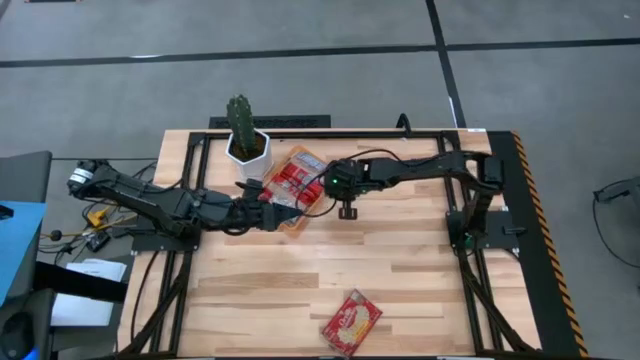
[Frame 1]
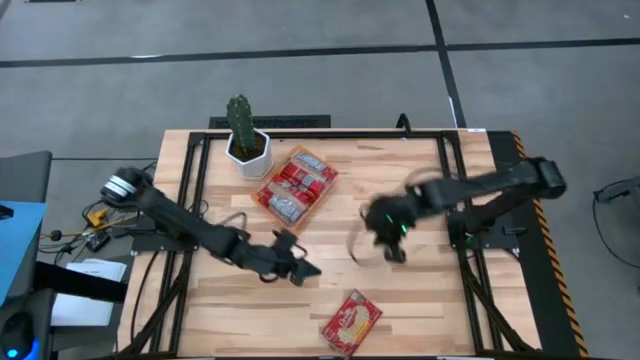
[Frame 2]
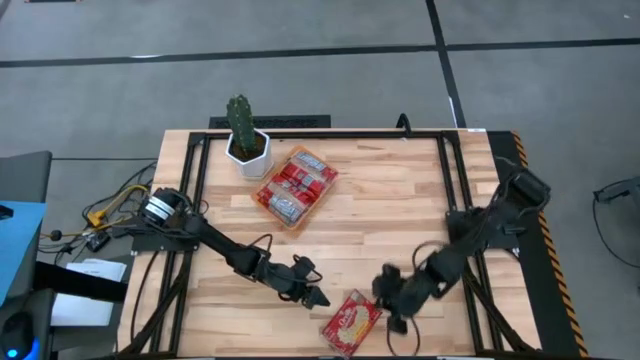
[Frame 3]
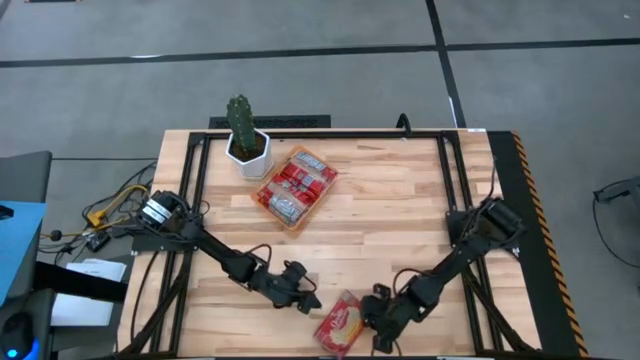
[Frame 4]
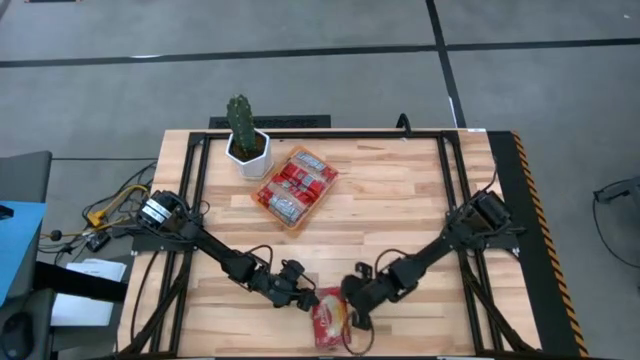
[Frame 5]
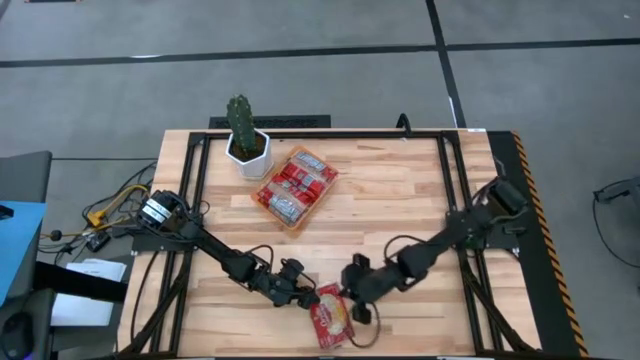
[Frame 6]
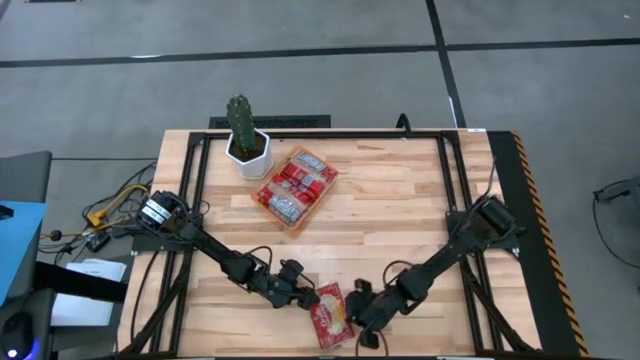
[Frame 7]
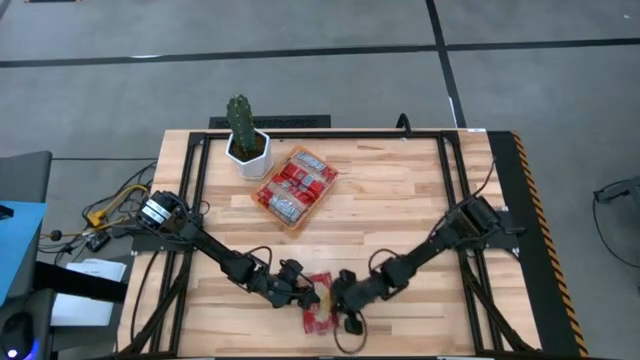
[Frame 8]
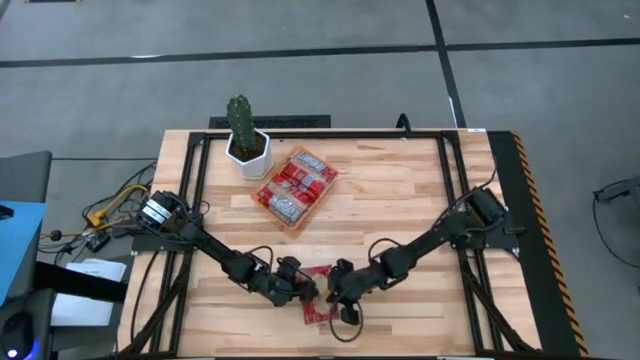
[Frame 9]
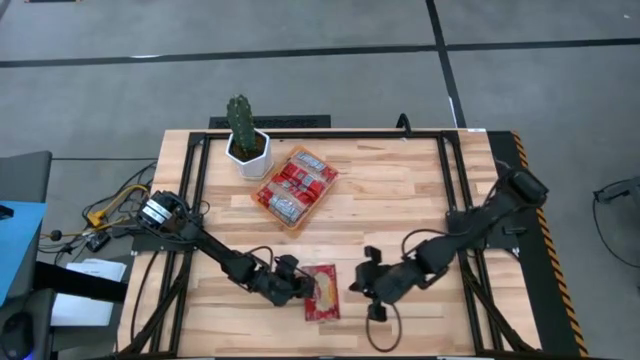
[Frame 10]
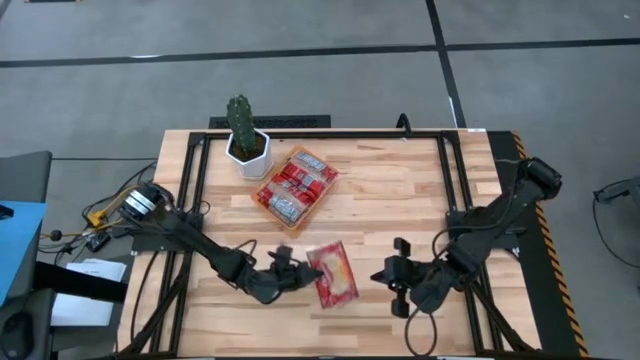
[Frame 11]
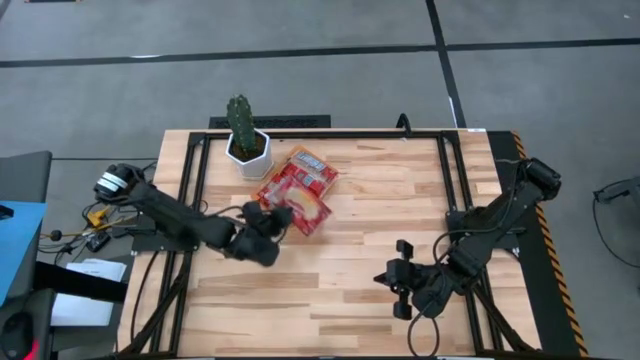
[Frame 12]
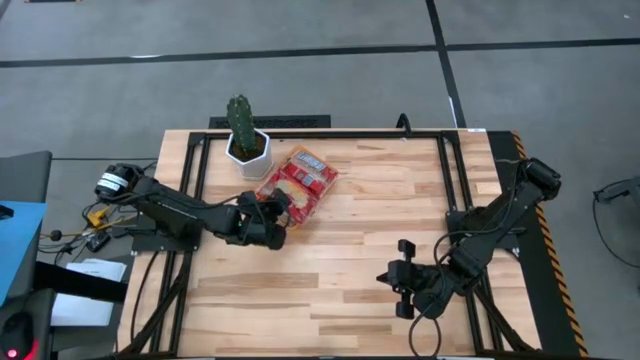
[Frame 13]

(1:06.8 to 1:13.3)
Task: Sort popcorn bags into baskets
Put the popcorn bag into the orange bin

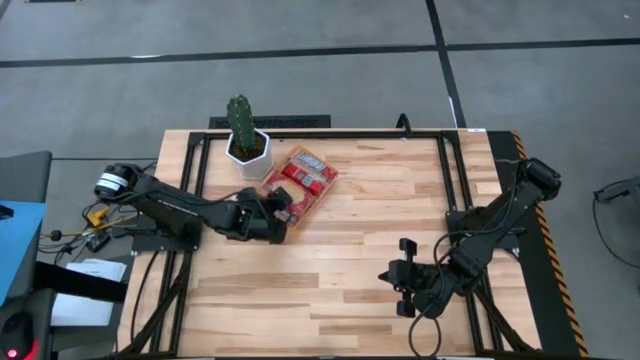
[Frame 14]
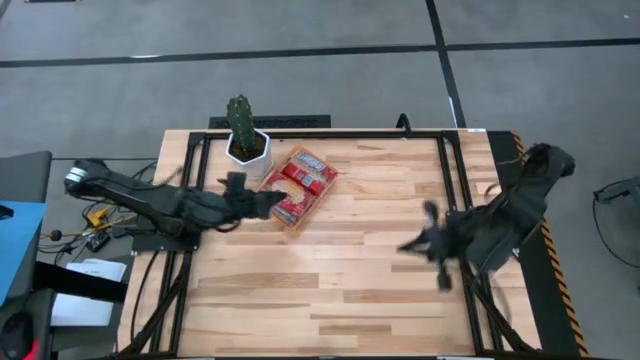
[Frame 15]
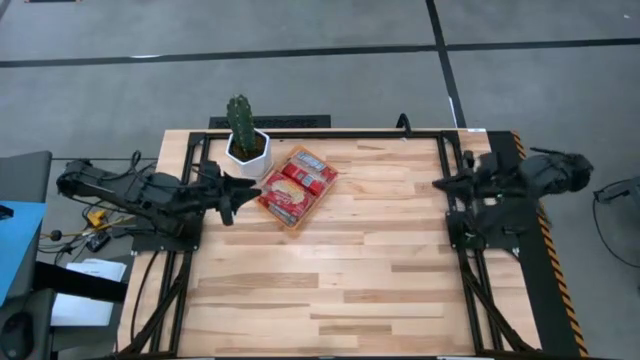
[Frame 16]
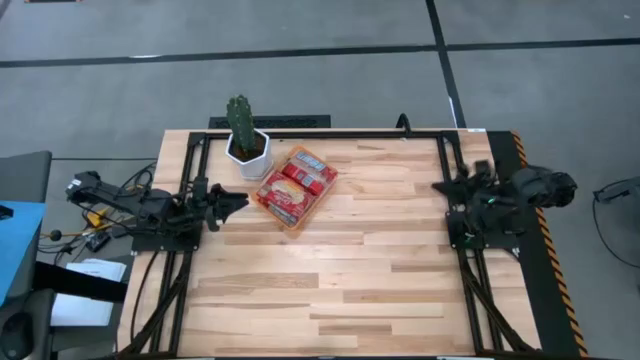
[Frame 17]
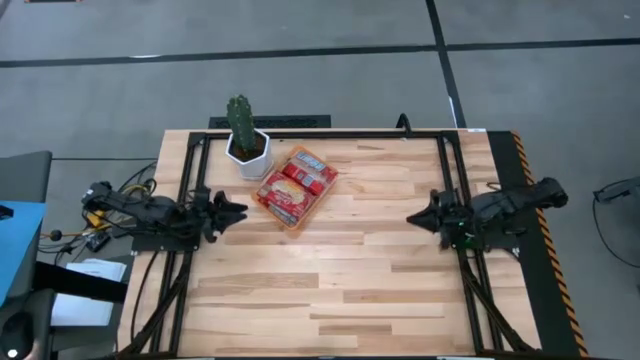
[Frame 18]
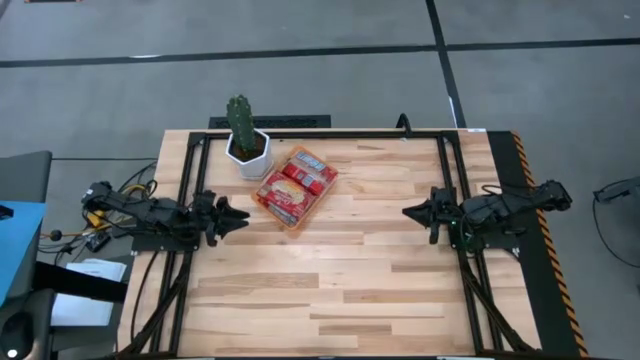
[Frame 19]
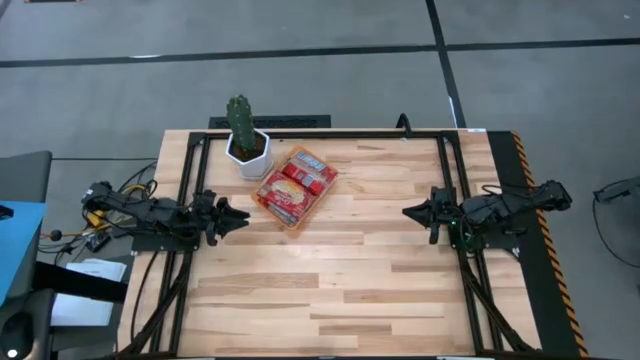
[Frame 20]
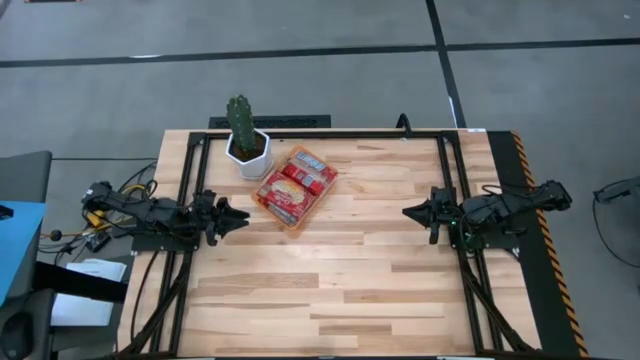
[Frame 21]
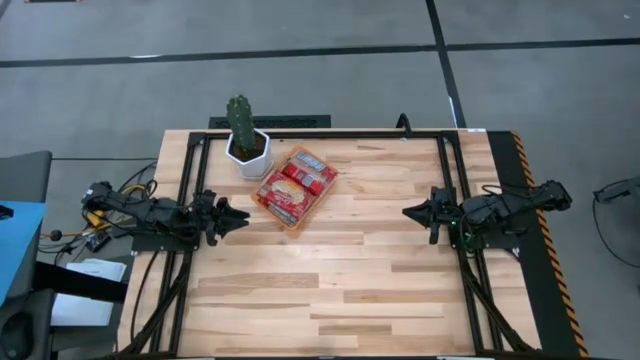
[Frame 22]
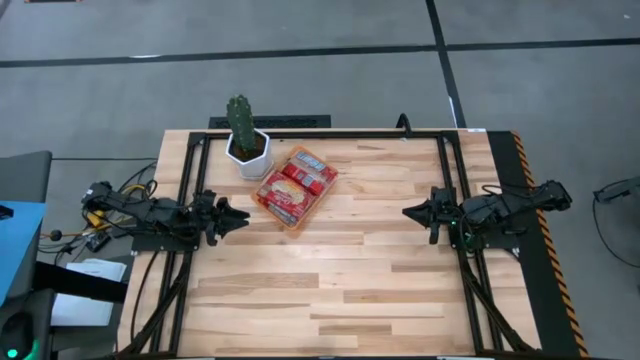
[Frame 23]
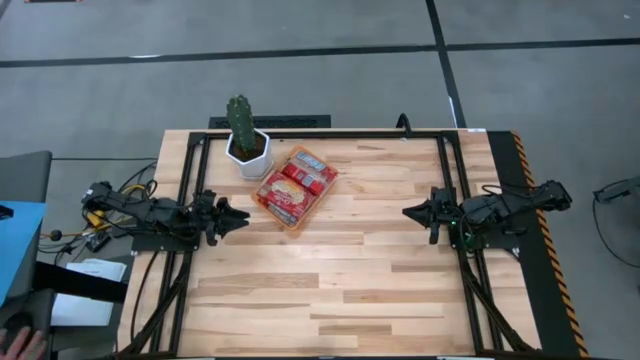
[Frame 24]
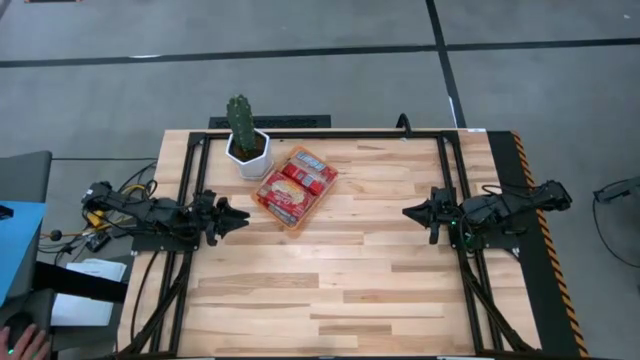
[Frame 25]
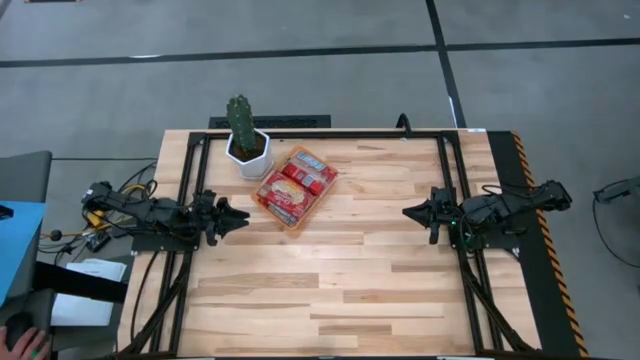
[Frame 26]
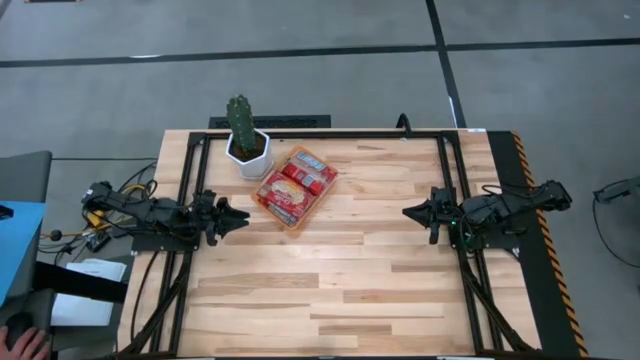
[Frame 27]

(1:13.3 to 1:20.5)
Return to Home Position

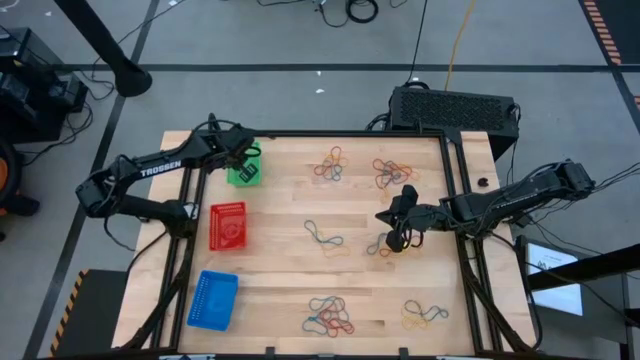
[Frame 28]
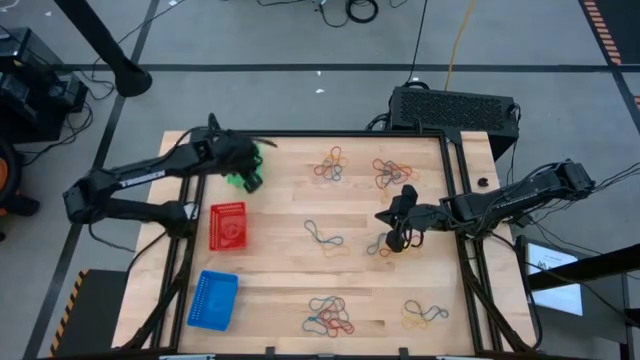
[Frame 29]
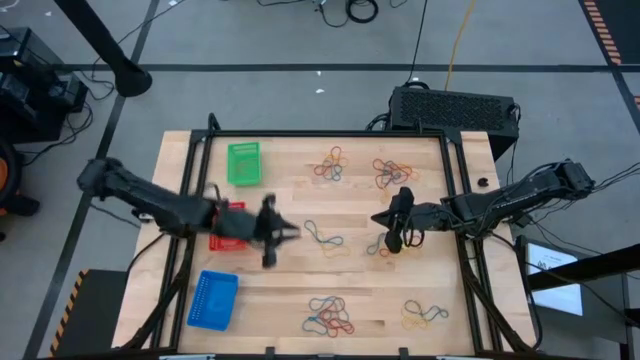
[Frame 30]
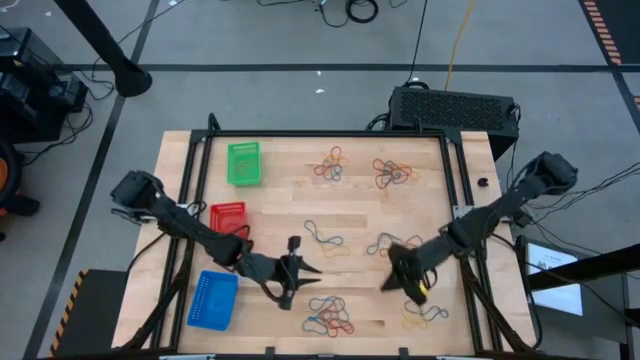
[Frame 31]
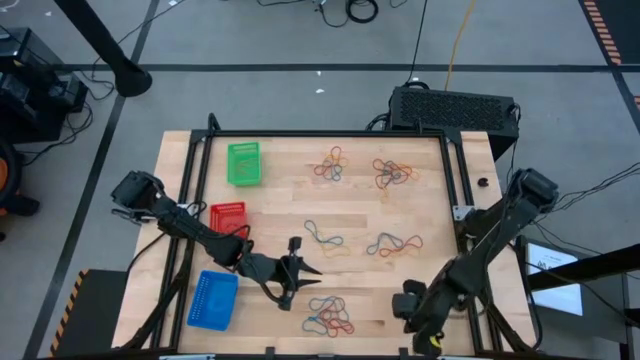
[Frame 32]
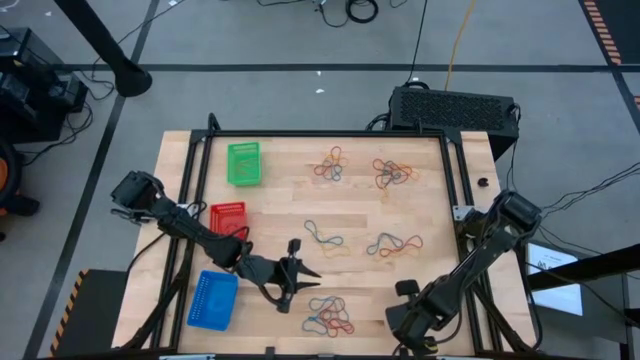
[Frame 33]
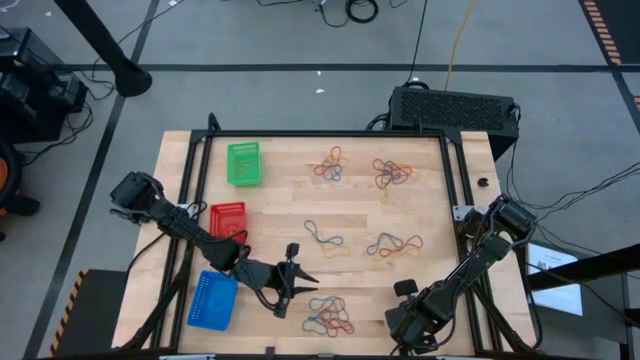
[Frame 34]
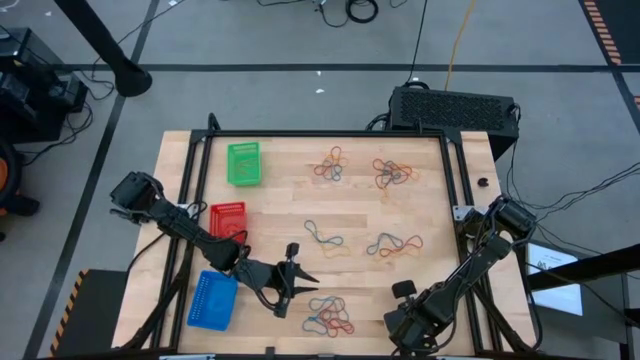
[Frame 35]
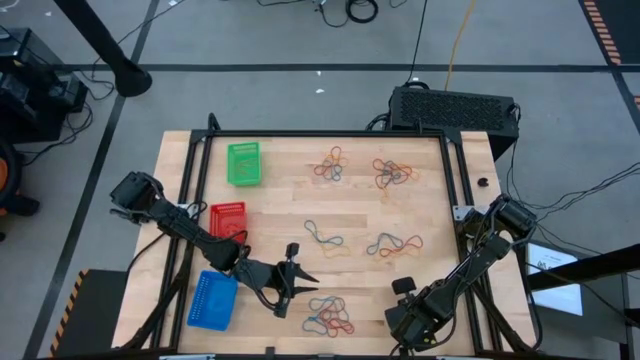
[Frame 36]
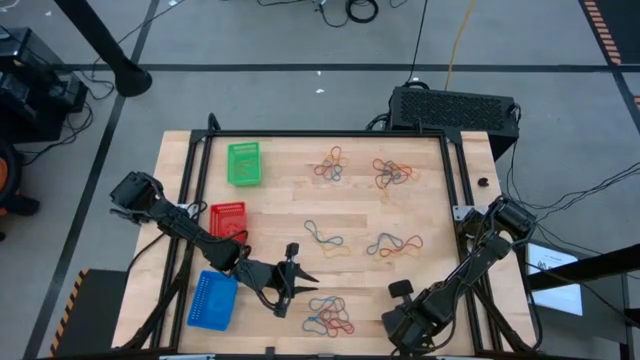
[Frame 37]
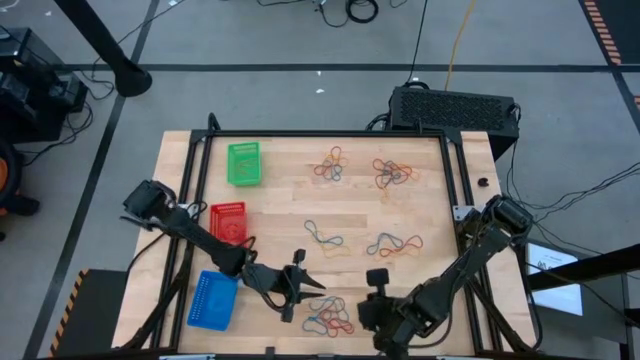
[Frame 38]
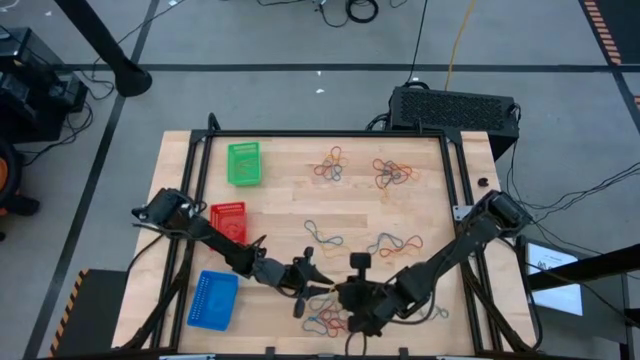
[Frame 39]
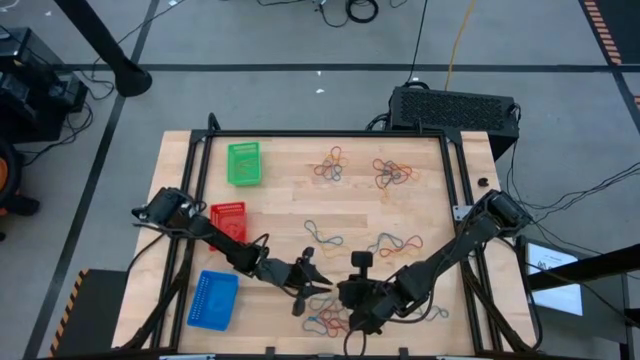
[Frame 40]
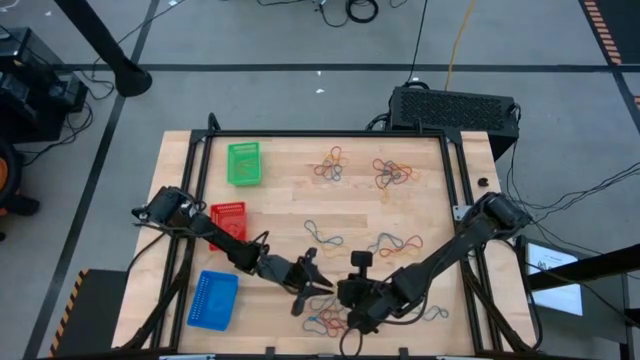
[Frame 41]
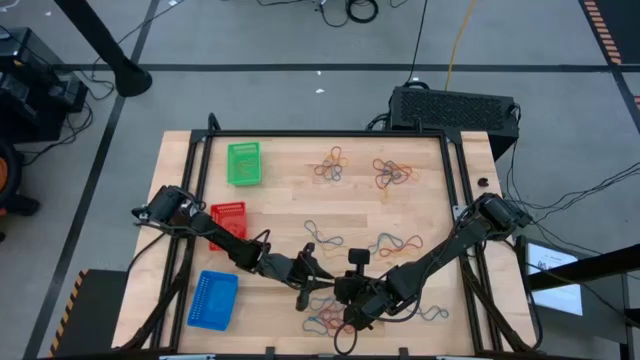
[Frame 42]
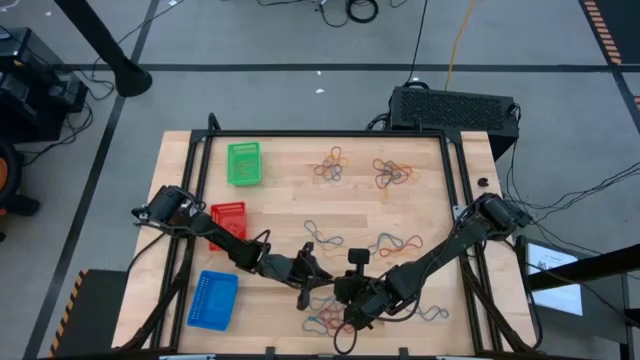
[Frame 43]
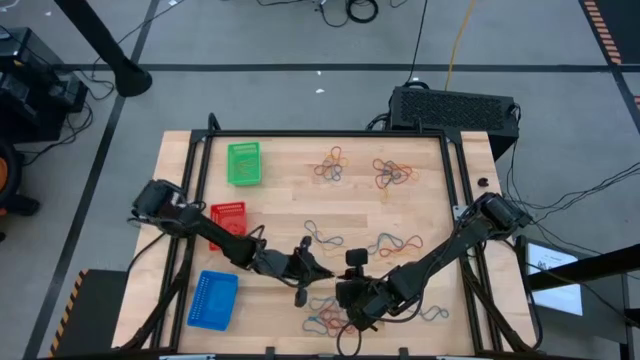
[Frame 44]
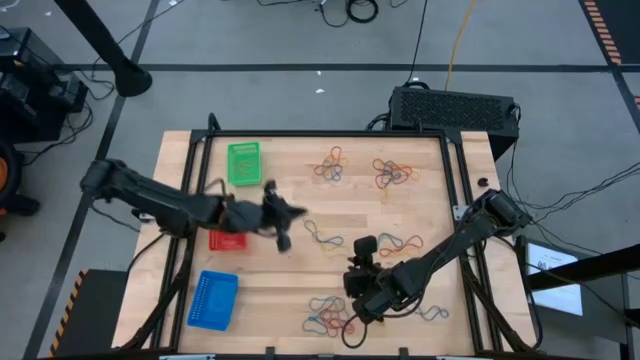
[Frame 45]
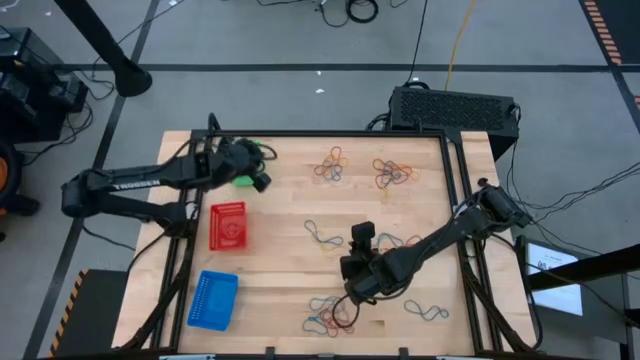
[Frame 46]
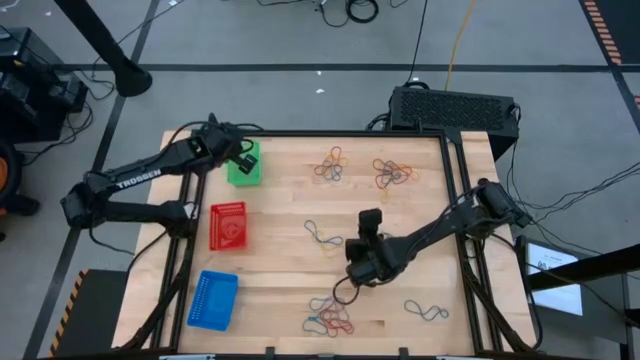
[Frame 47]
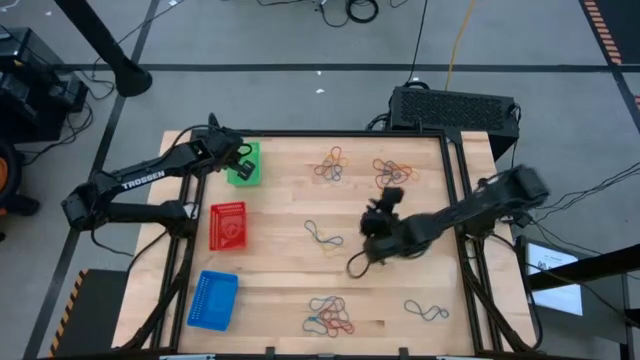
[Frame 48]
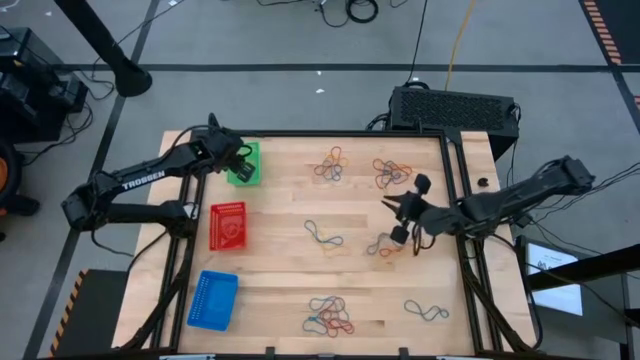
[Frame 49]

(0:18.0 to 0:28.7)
Task: Sort rubber bands into baskets
Put the yellow rubber band into the green bin
